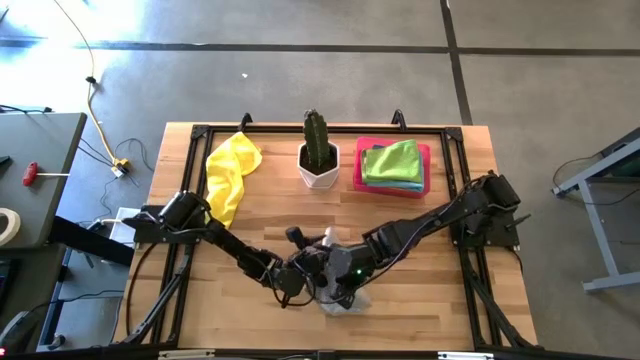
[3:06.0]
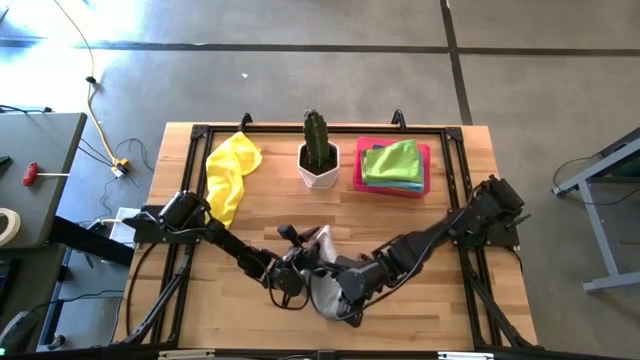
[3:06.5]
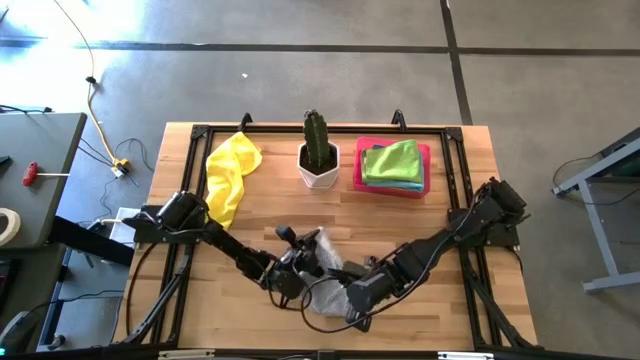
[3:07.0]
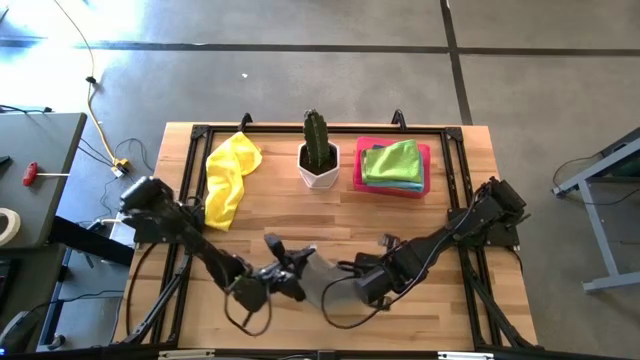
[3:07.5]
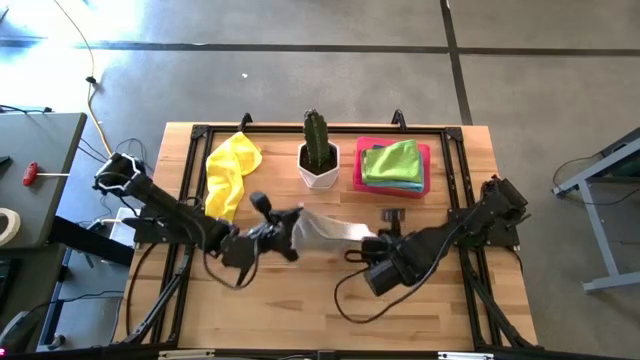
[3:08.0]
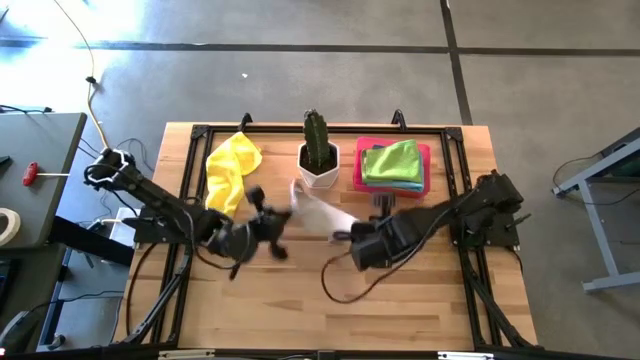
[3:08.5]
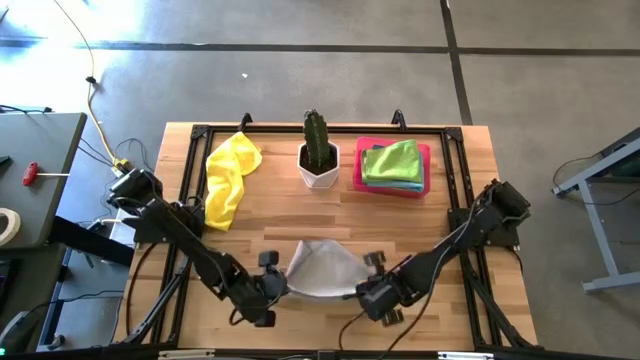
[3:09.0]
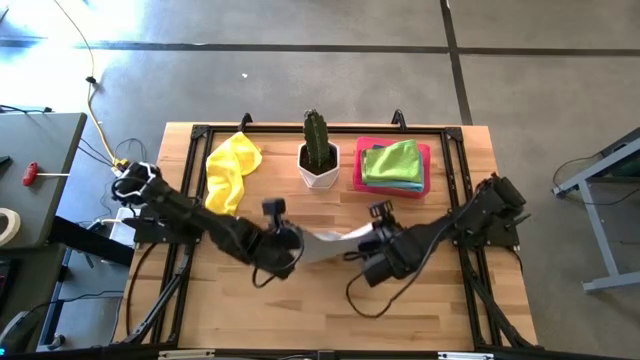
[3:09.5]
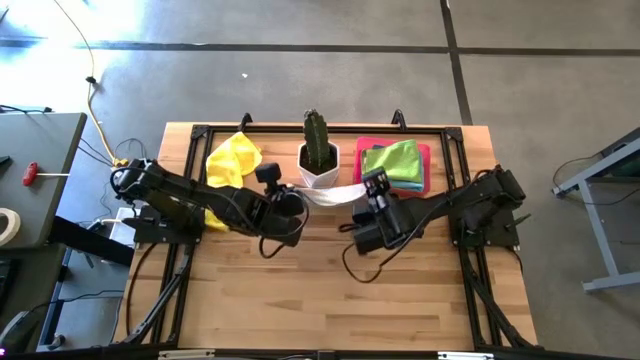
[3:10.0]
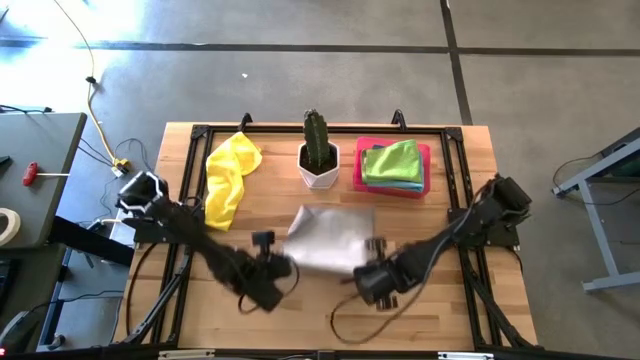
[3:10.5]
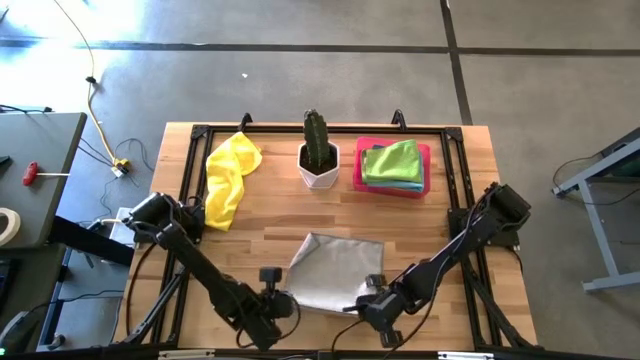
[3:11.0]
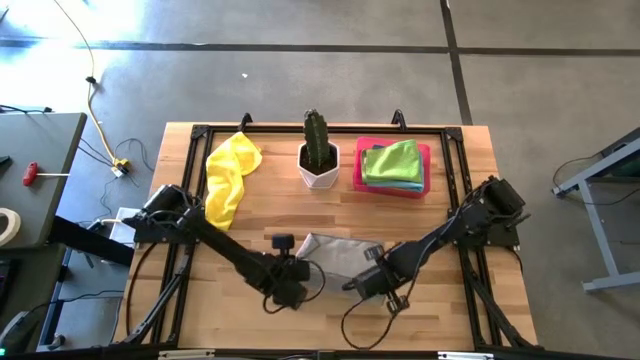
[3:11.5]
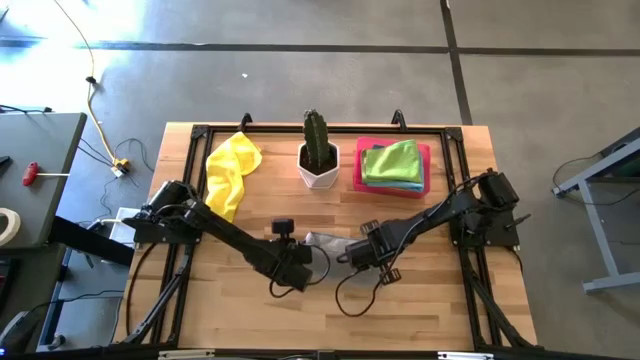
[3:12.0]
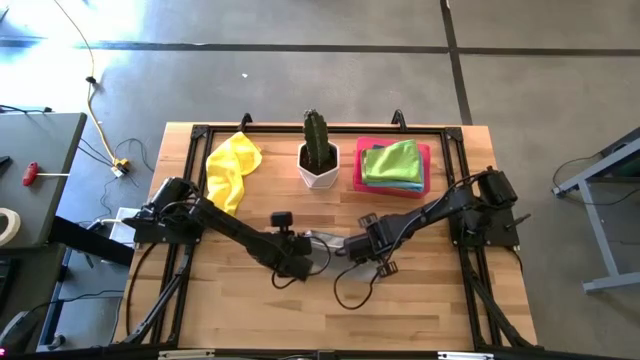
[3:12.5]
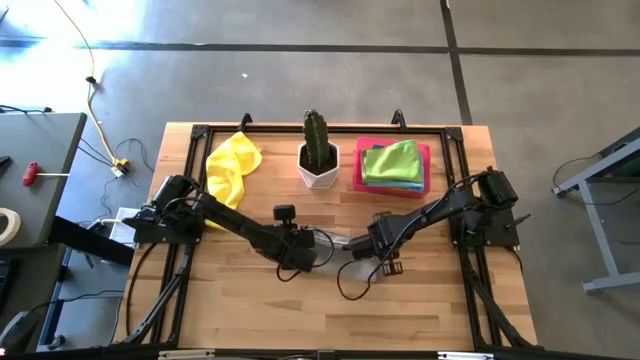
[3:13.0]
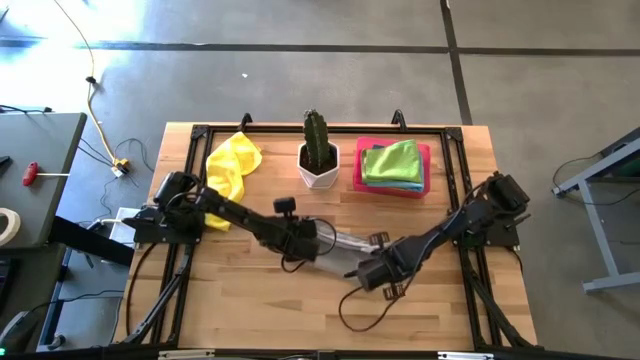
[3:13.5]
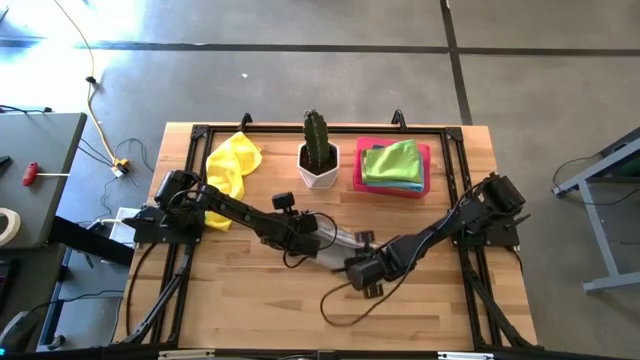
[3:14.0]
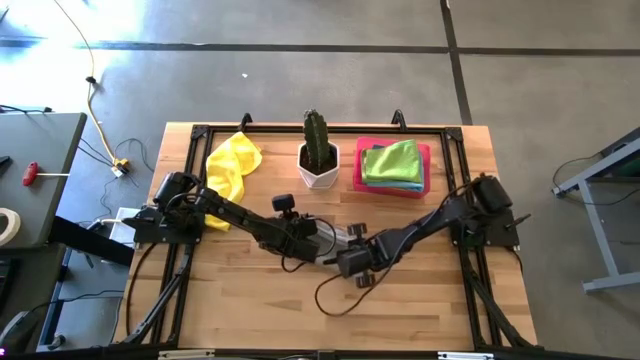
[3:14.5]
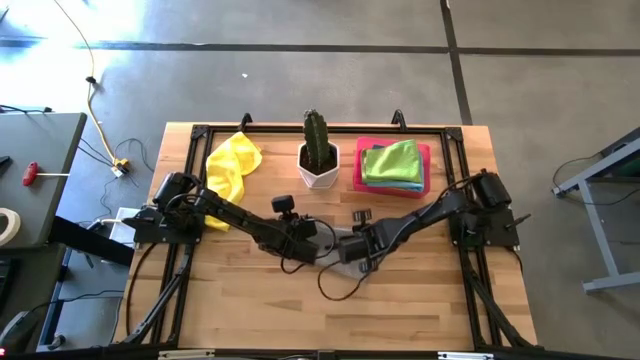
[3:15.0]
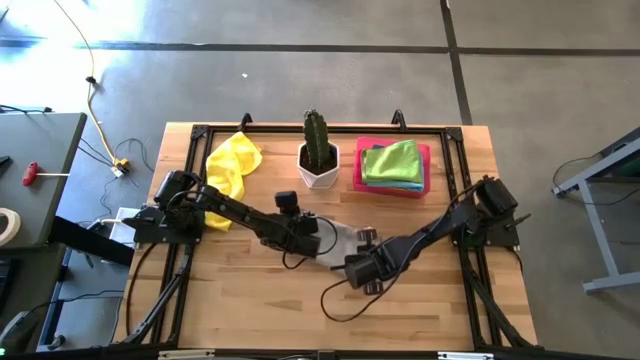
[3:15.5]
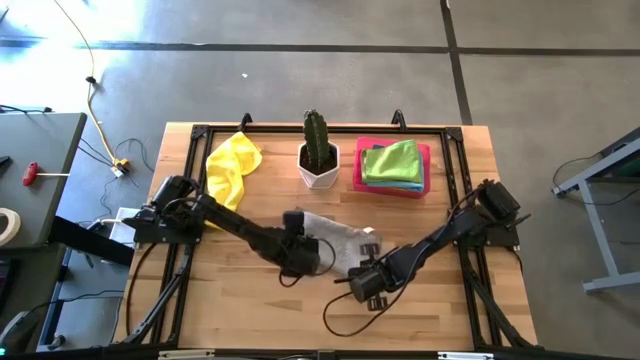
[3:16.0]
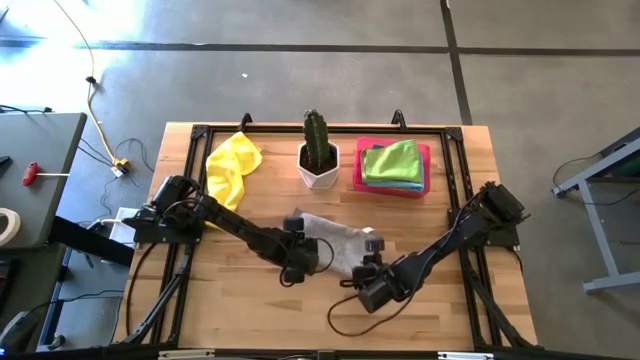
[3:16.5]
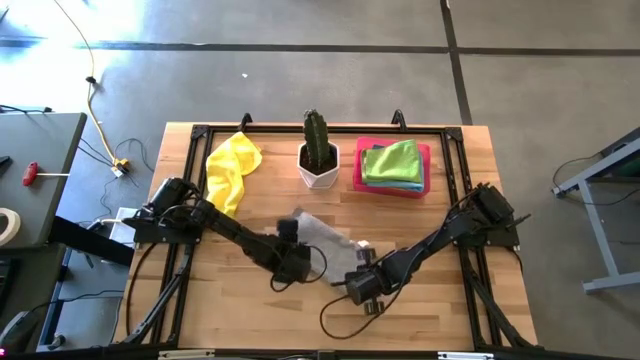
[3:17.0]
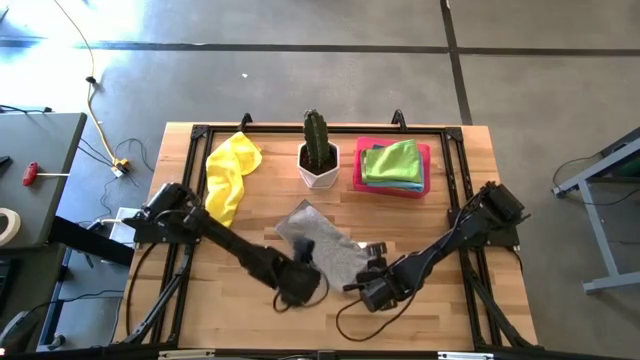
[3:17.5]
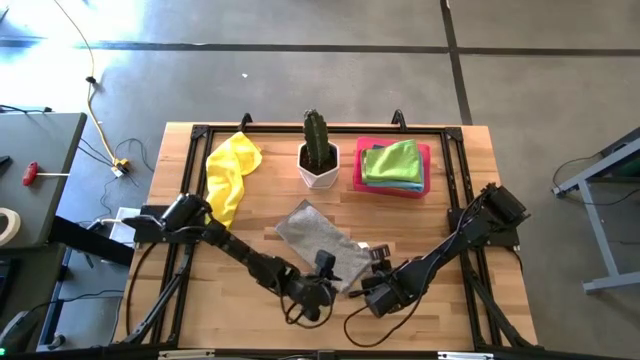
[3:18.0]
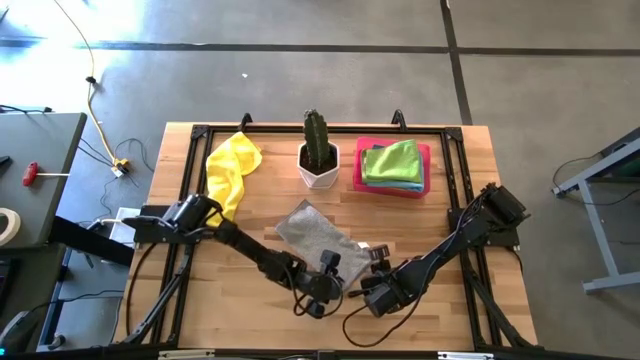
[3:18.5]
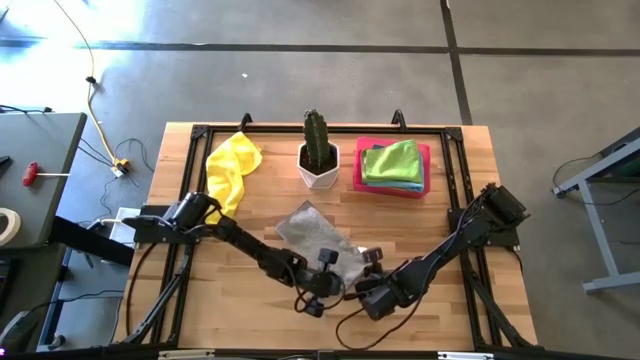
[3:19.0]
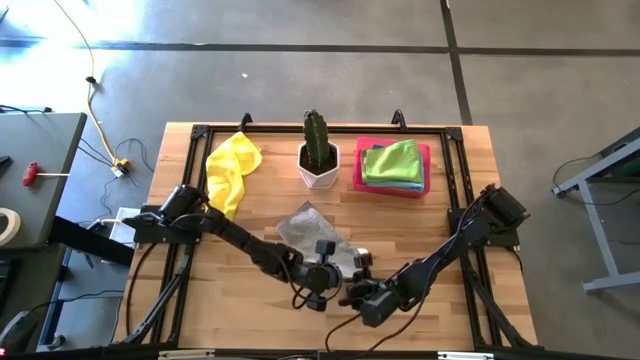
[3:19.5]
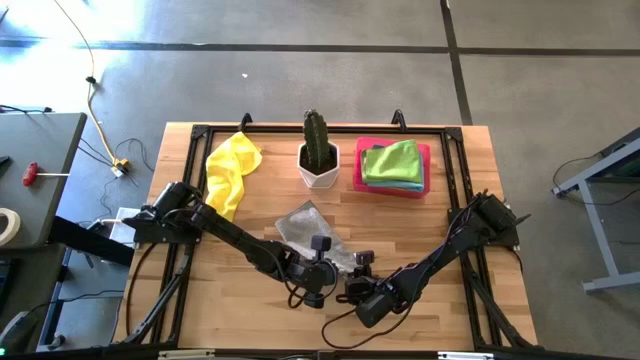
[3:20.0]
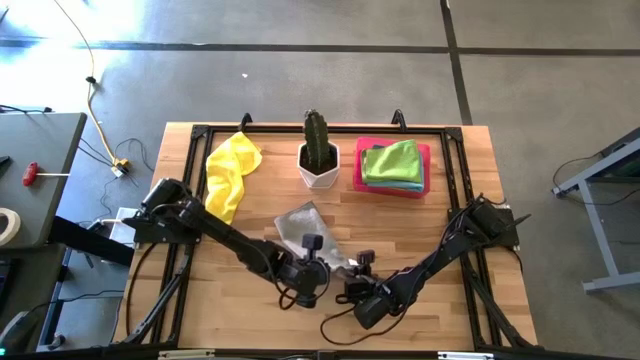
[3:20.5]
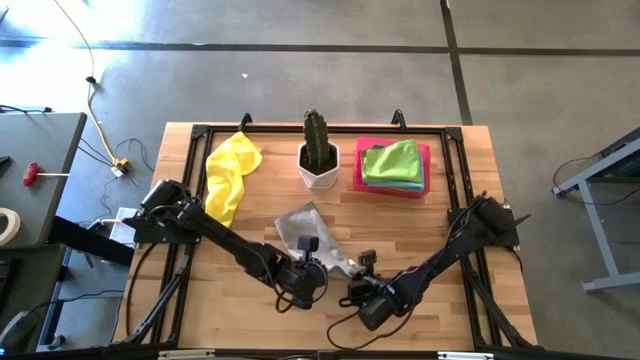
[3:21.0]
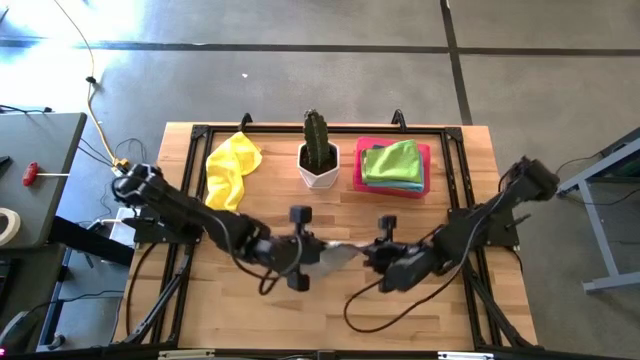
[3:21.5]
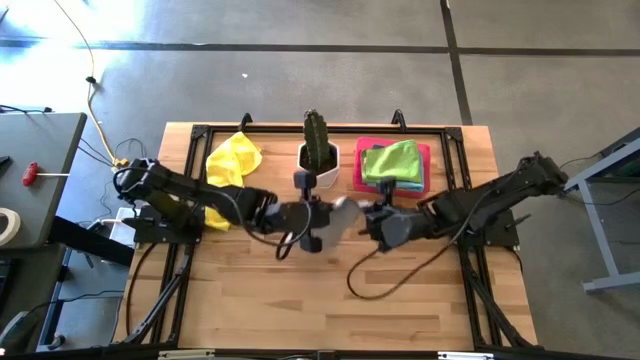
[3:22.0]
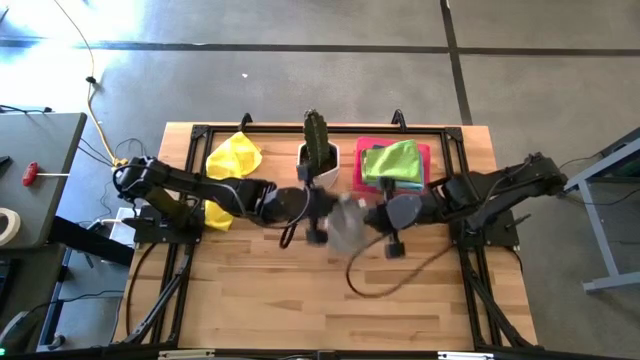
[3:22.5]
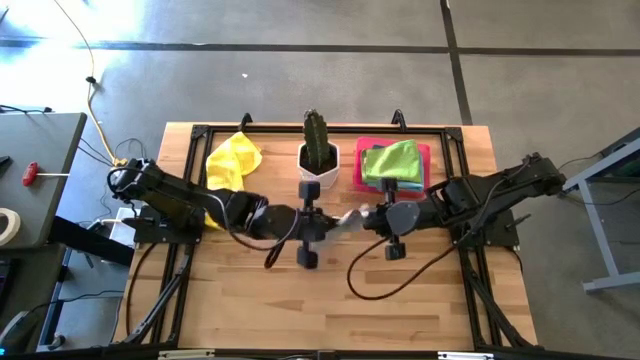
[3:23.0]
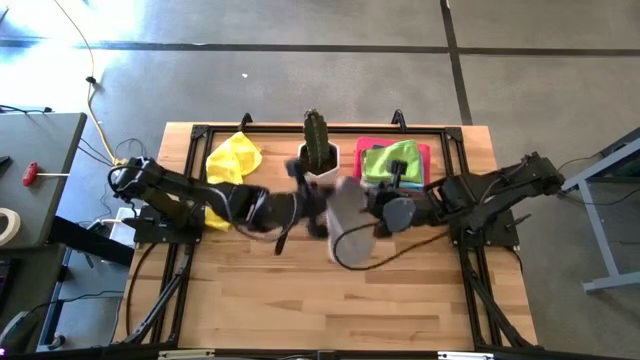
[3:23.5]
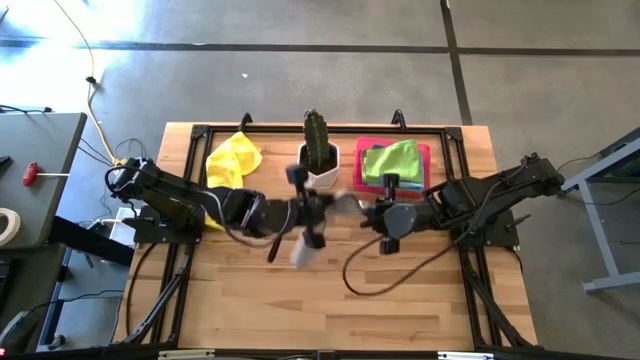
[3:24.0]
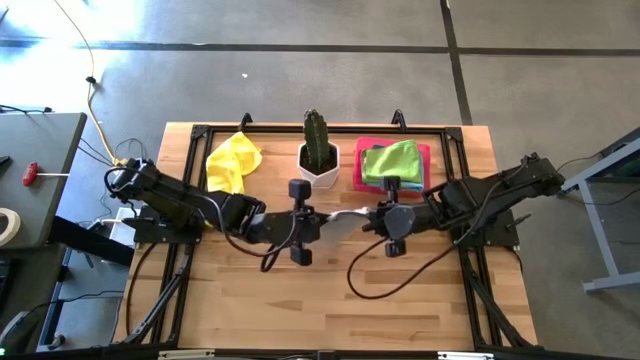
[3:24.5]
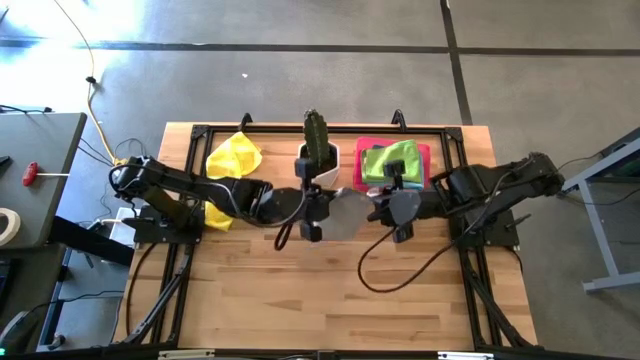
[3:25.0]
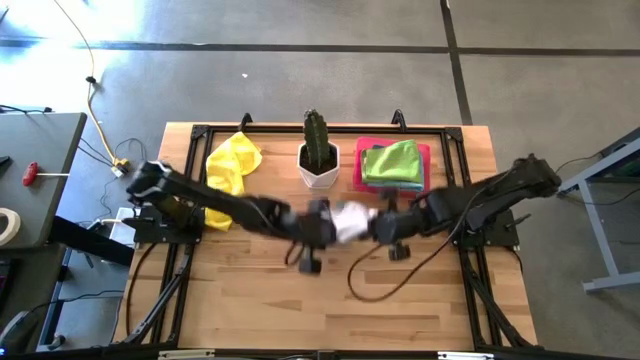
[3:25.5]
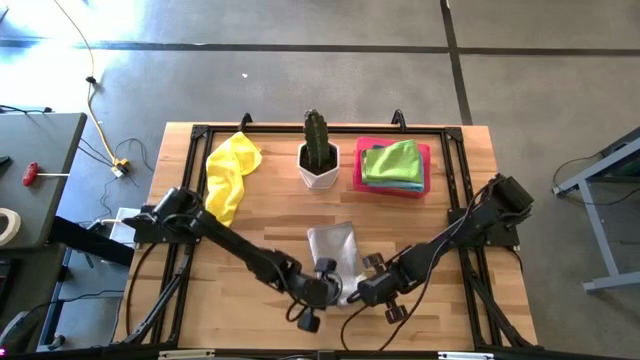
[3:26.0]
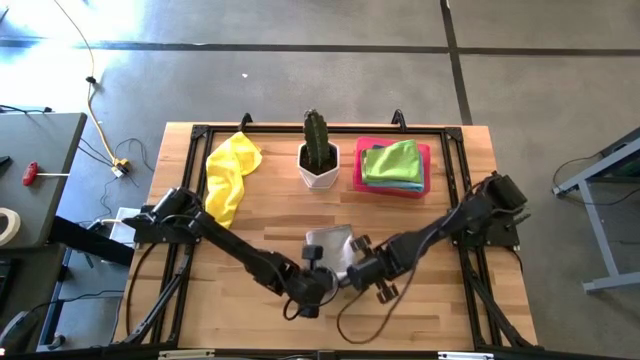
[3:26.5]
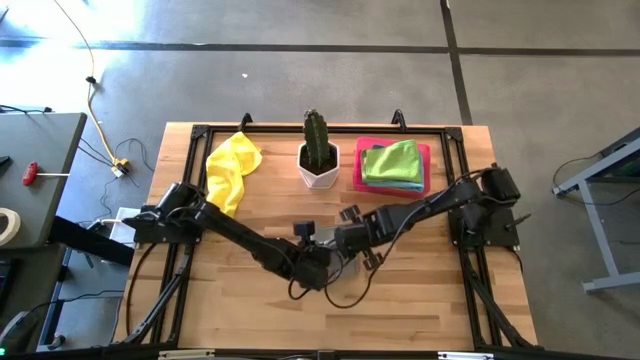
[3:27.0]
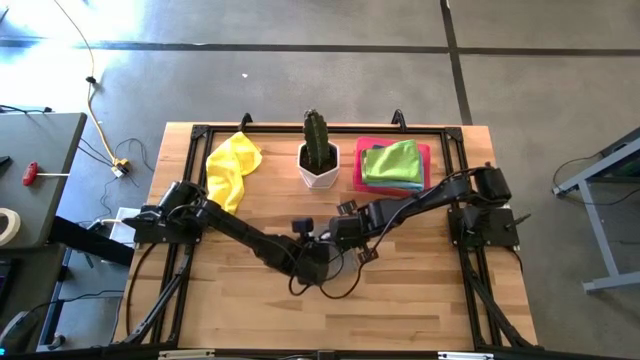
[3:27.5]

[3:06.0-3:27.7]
Task: Fold microfiber towels
Fold the gray towel
